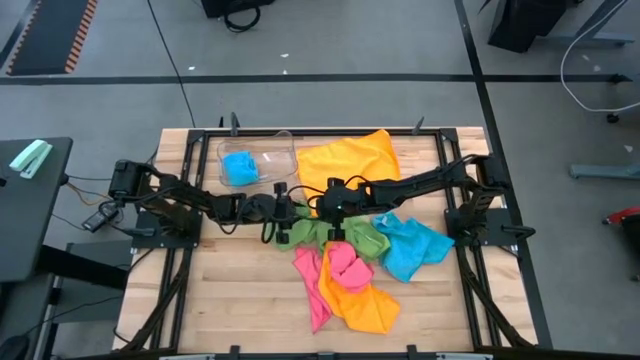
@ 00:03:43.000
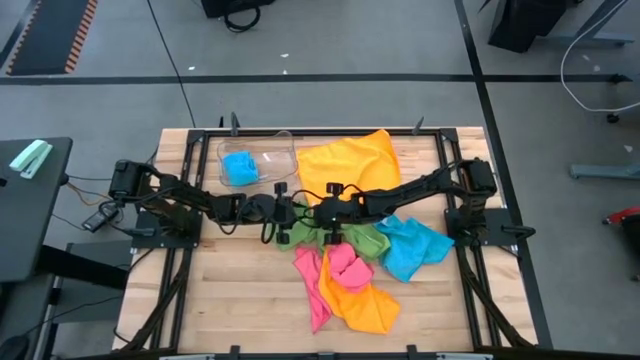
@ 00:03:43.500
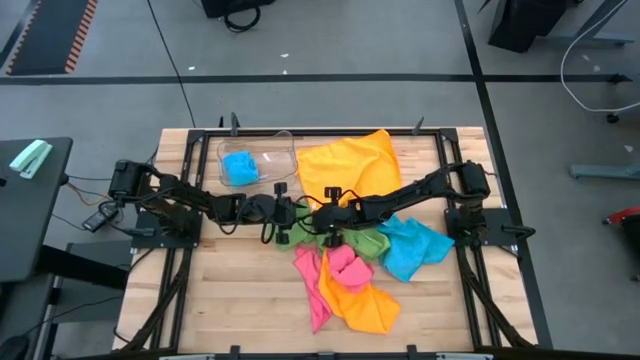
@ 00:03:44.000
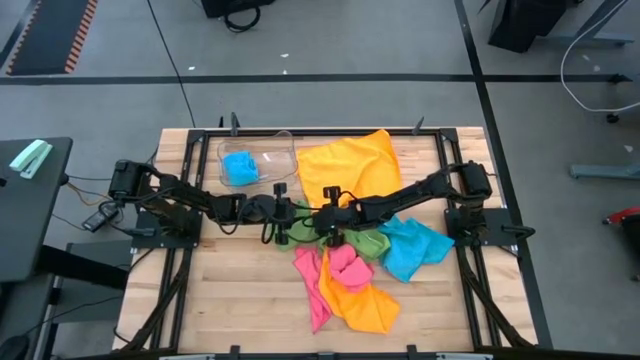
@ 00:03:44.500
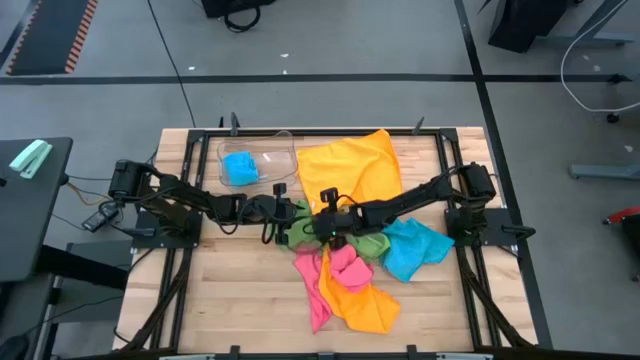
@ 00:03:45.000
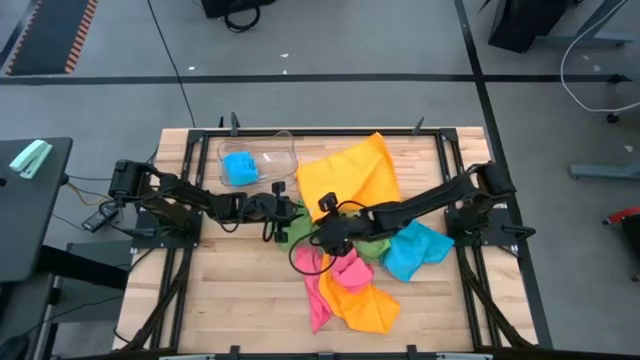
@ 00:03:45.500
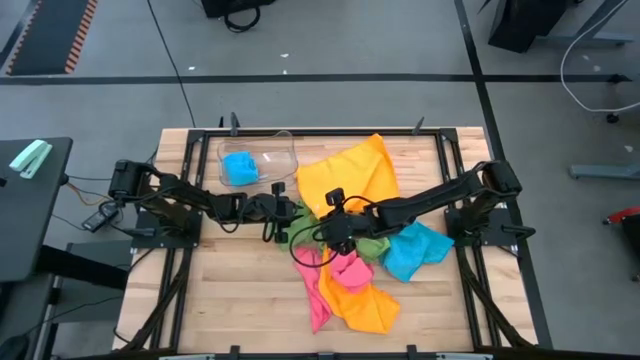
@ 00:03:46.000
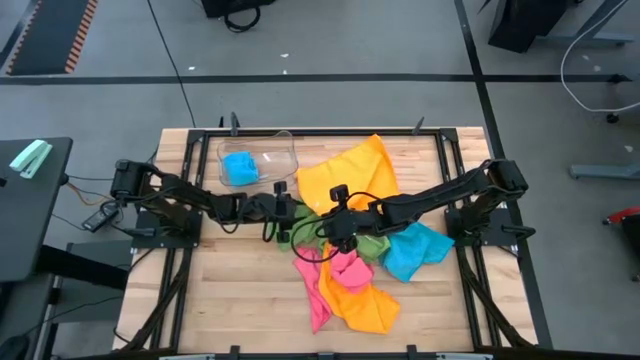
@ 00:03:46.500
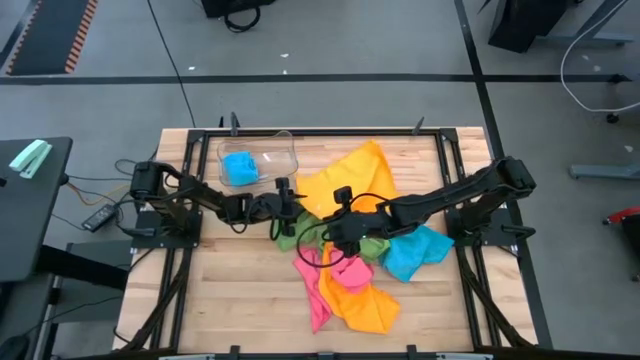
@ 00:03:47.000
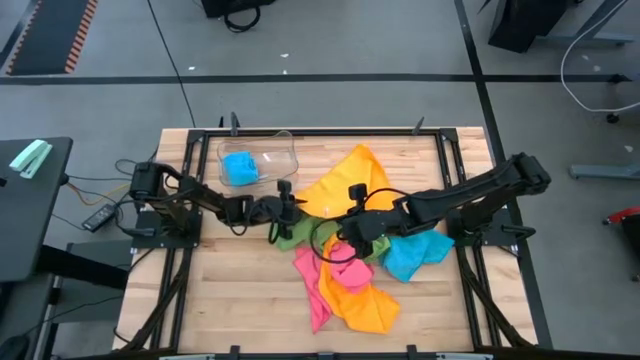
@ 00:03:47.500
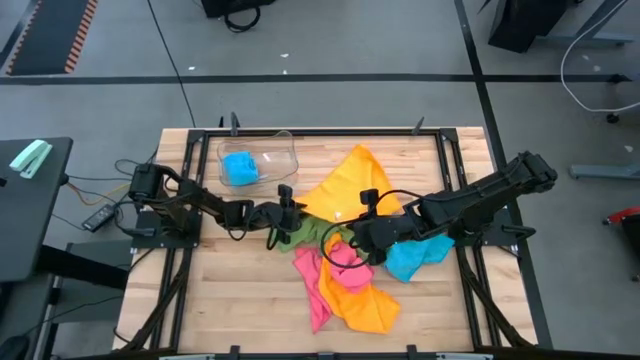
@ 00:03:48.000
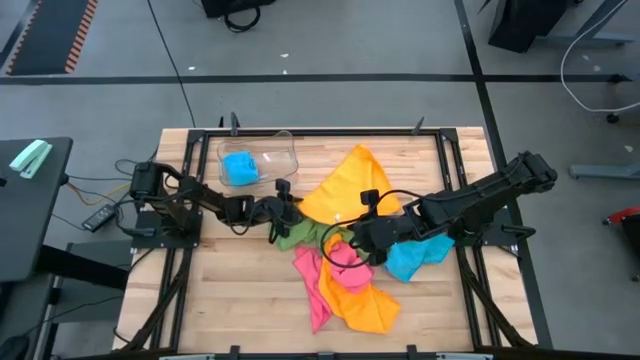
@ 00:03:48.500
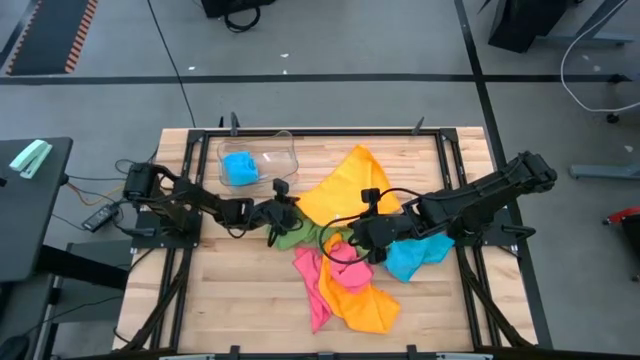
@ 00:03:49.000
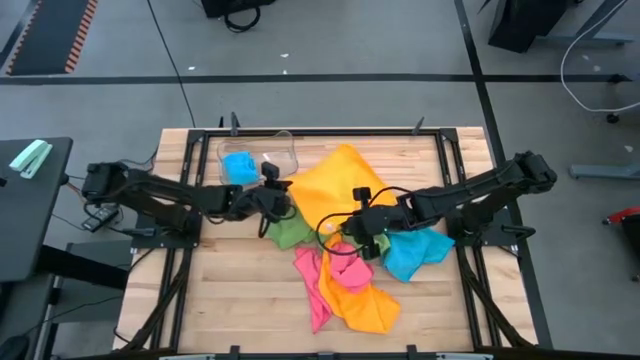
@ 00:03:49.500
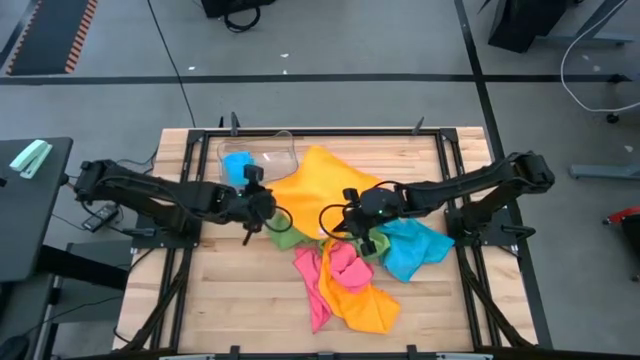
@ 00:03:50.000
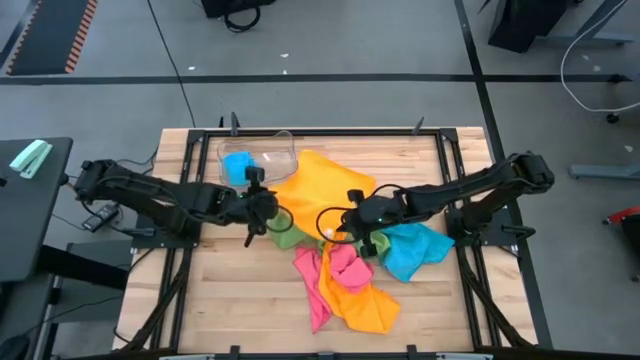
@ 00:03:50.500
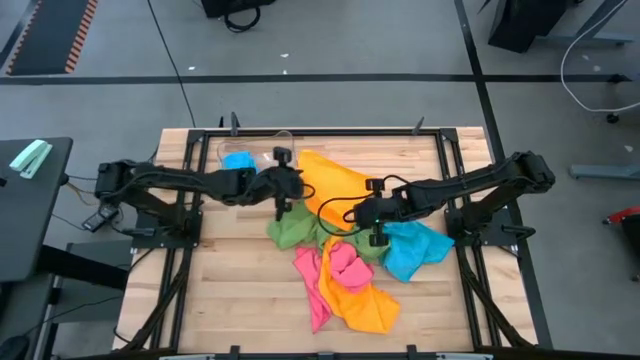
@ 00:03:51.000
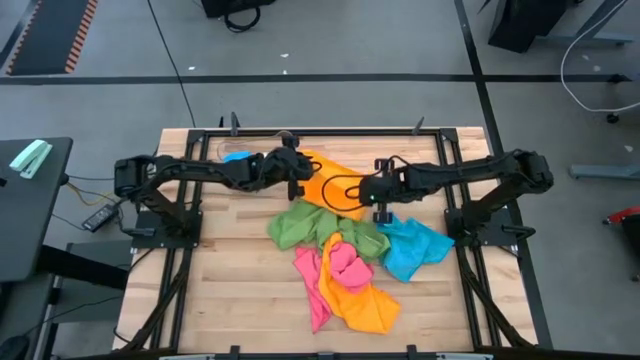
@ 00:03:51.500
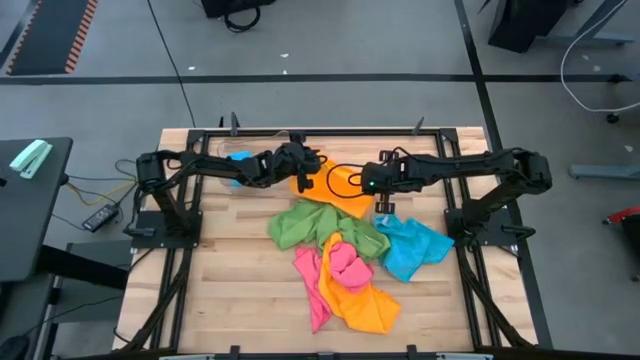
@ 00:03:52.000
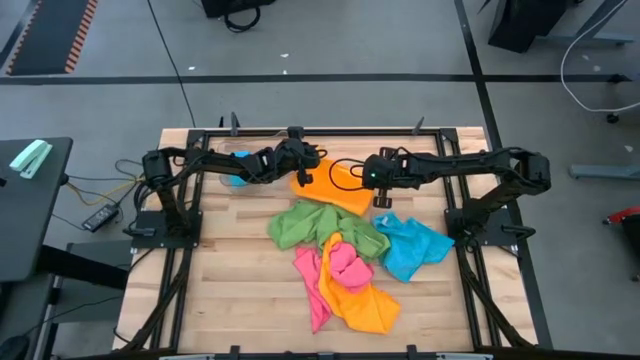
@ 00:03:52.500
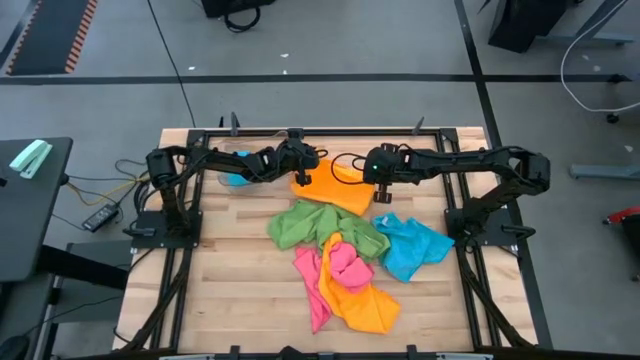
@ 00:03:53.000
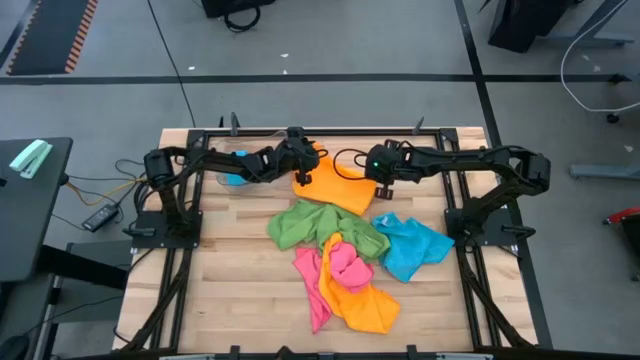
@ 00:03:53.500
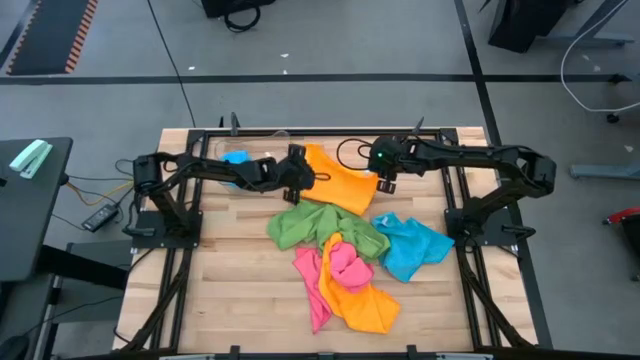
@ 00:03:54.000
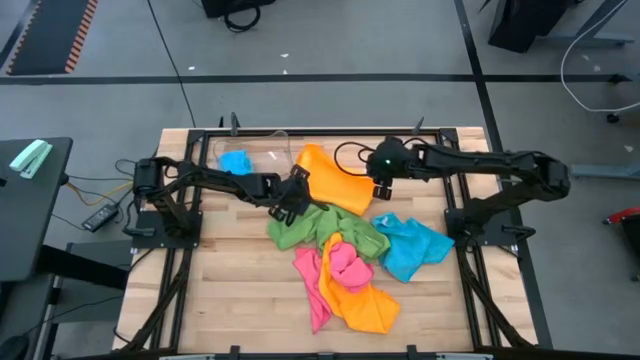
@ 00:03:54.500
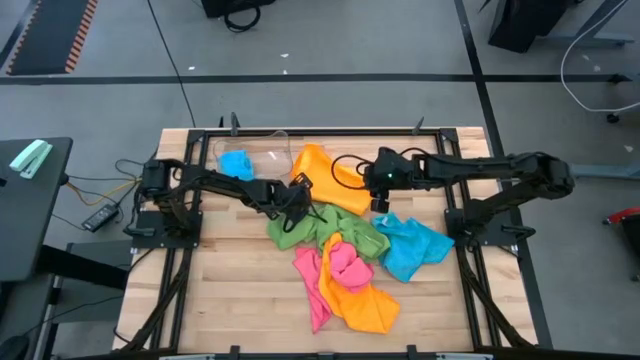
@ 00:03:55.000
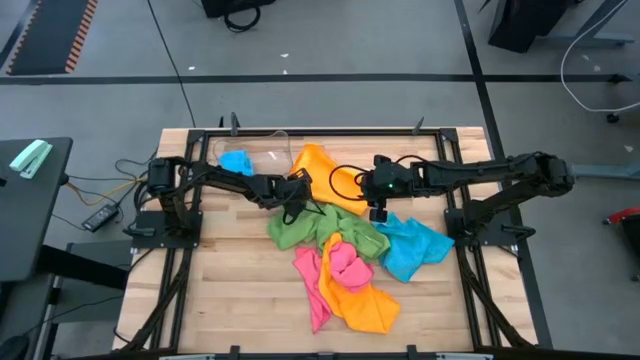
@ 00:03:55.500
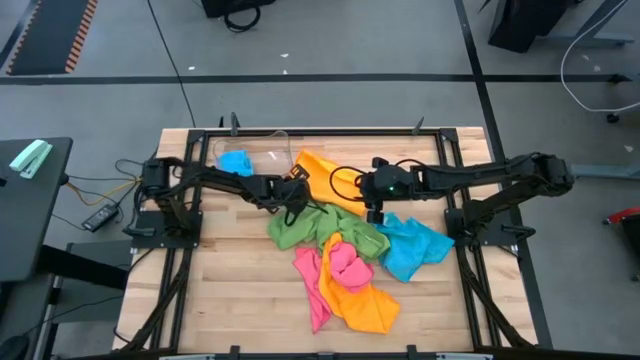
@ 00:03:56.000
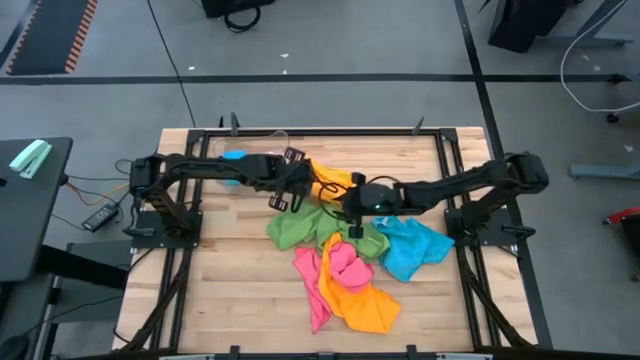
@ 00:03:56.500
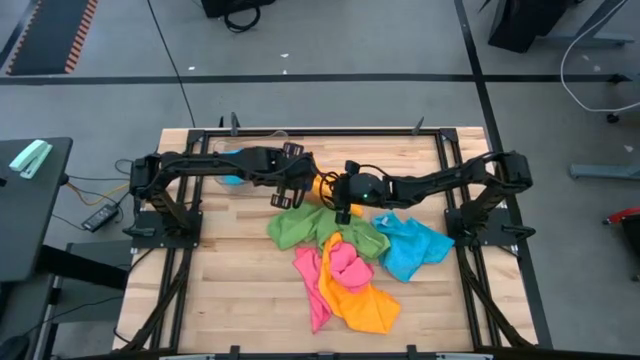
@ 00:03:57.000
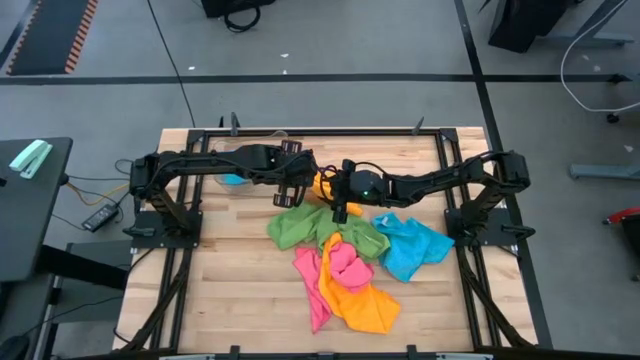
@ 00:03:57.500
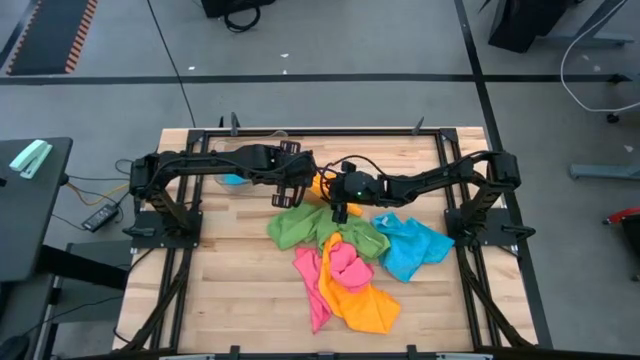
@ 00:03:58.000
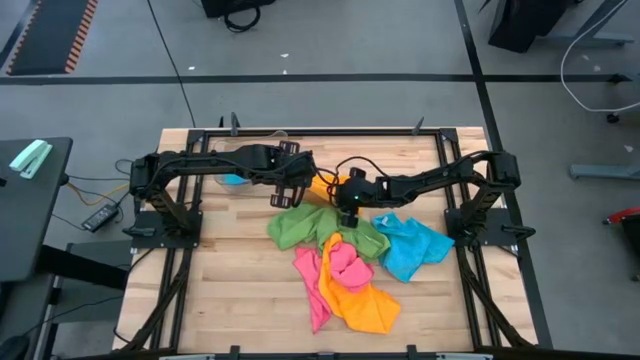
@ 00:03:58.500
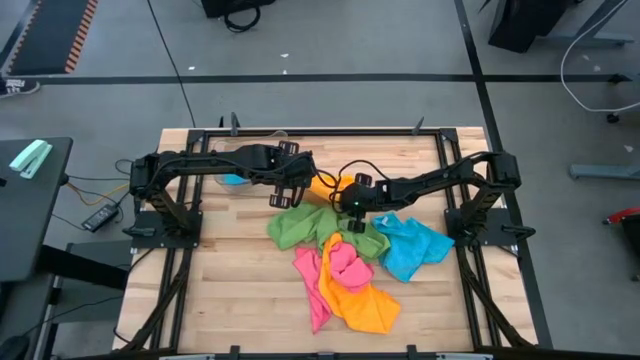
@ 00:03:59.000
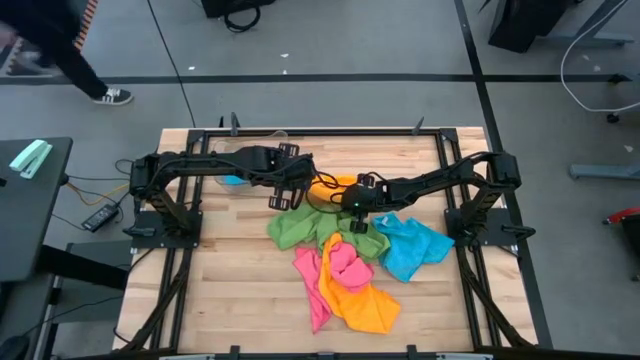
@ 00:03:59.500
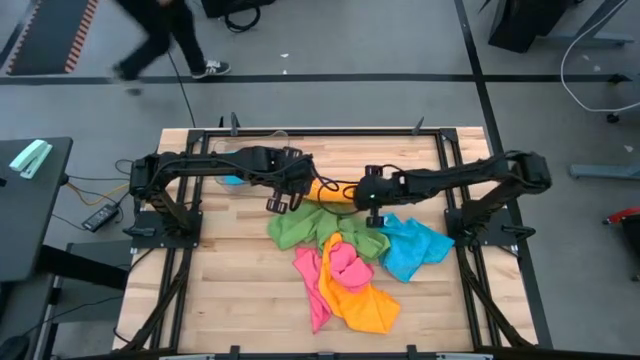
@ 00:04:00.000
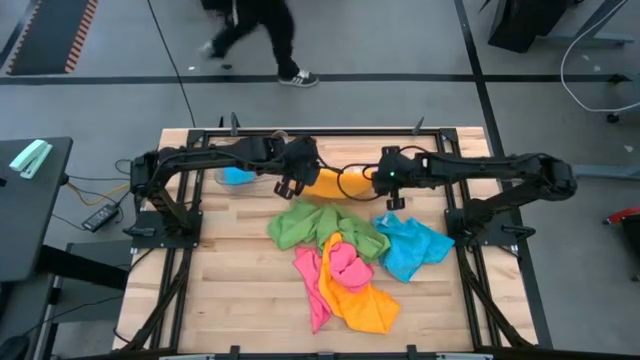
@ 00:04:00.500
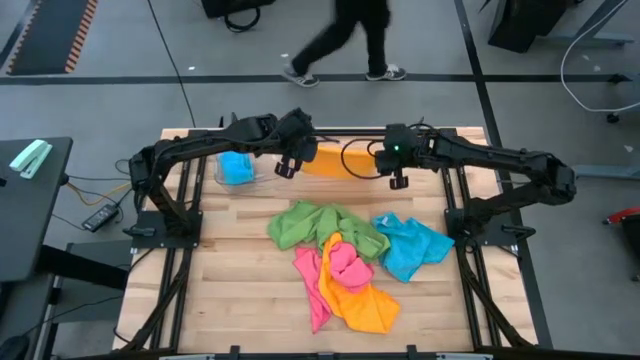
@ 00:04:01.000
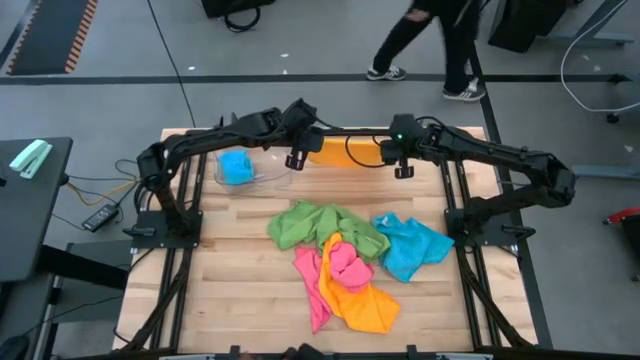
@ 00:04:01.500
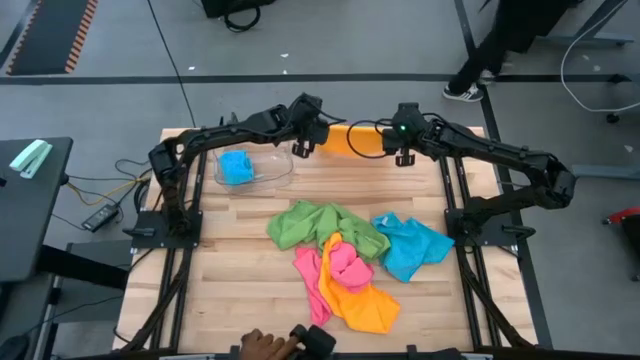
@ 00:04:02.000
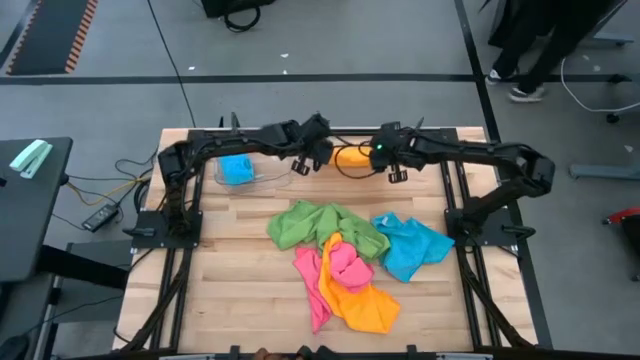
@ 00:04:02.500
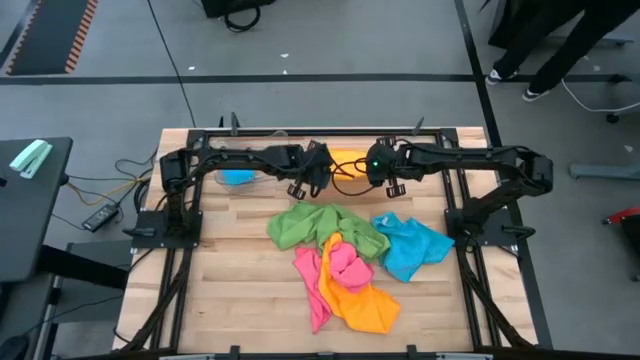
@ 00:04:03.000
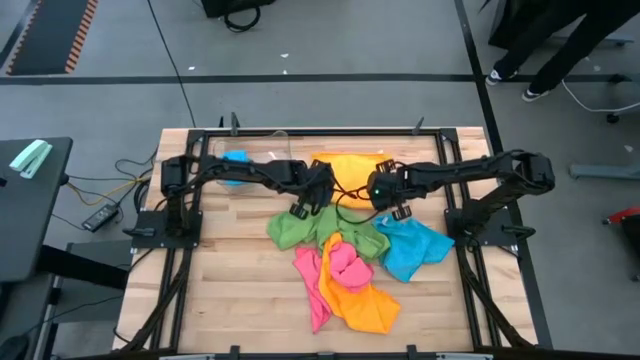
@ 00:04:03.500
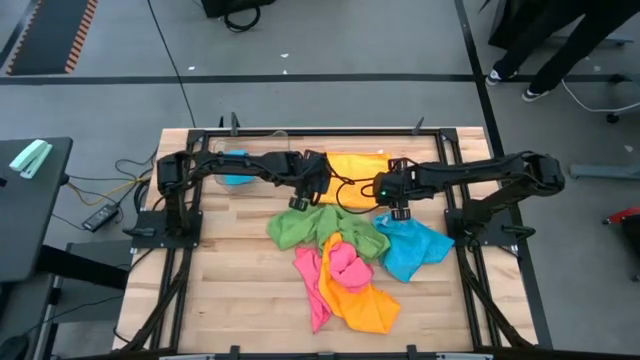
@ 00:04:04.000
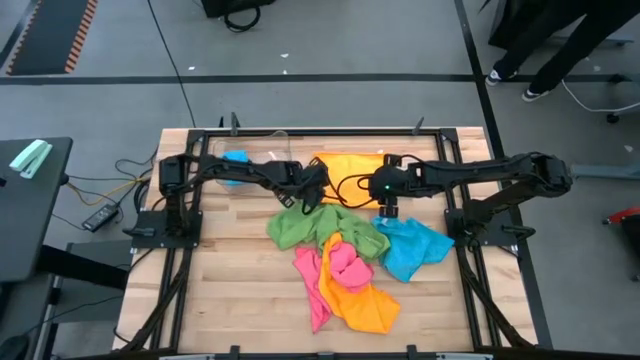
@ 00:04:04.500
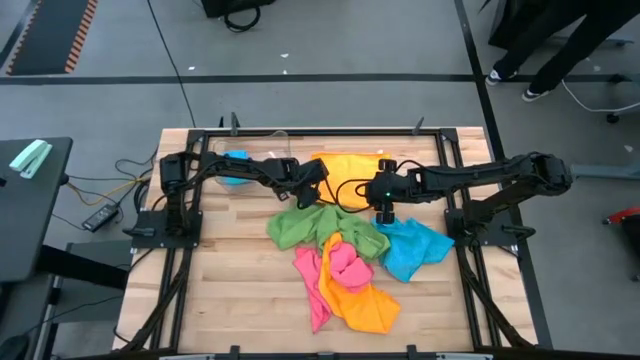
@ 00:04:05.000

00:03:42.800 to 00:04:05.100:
Task: Fold microfiber towels
Fold the top orange microfiber towel
